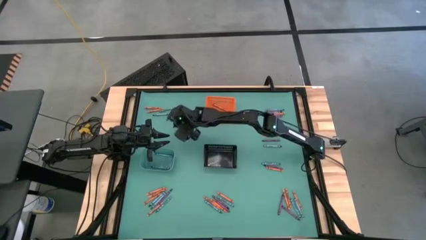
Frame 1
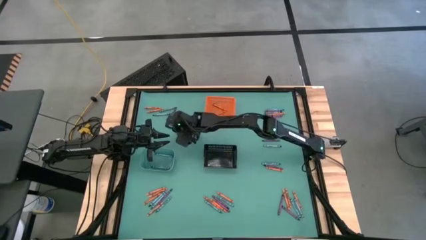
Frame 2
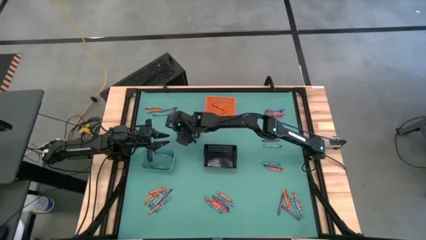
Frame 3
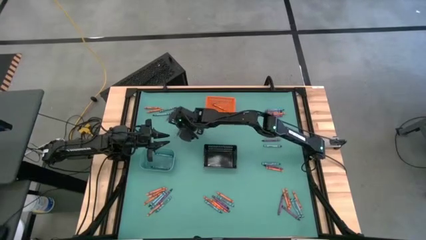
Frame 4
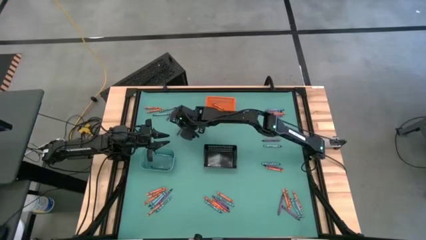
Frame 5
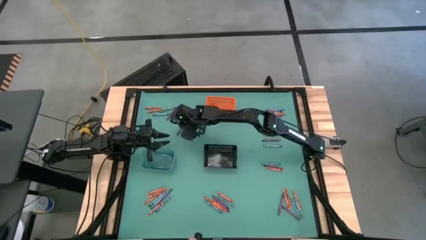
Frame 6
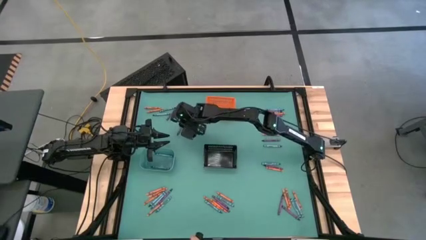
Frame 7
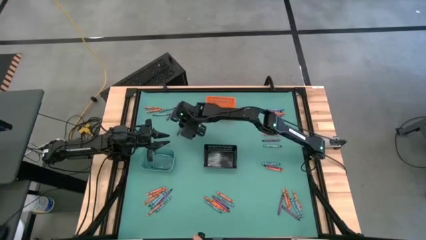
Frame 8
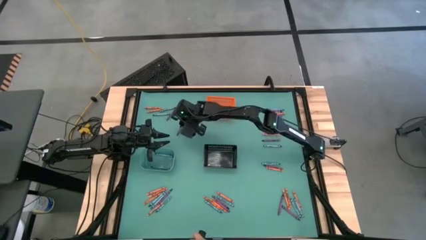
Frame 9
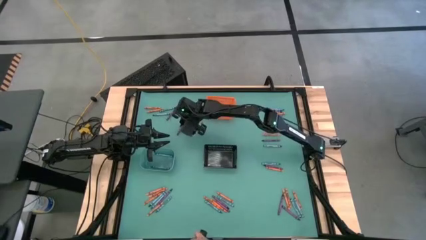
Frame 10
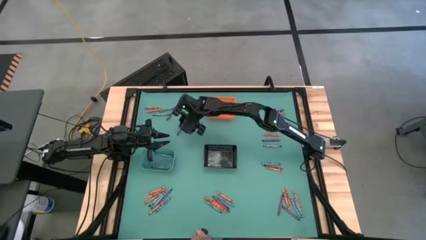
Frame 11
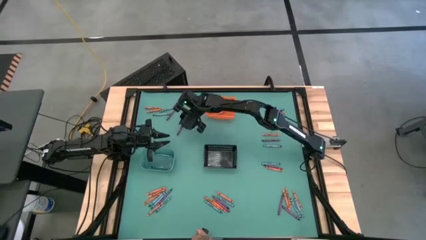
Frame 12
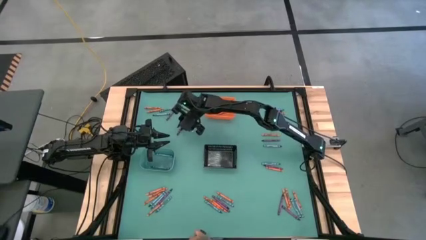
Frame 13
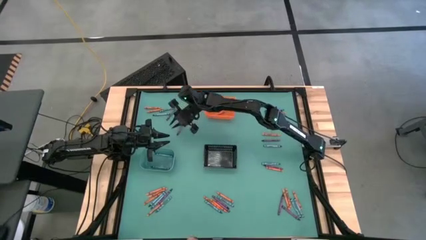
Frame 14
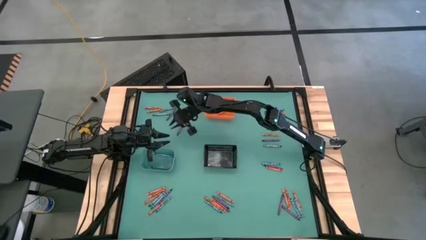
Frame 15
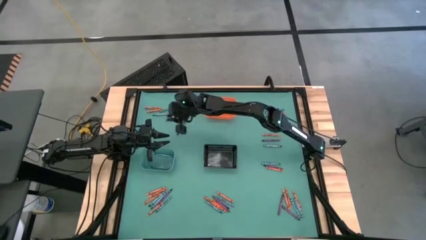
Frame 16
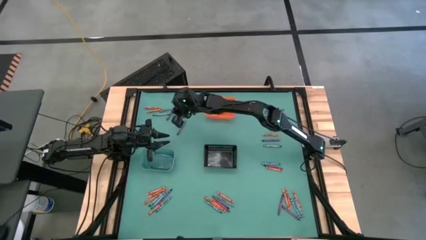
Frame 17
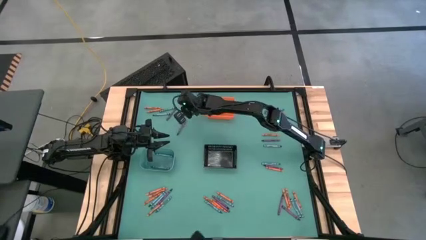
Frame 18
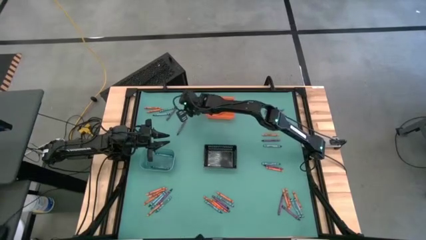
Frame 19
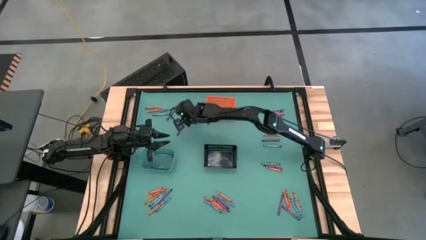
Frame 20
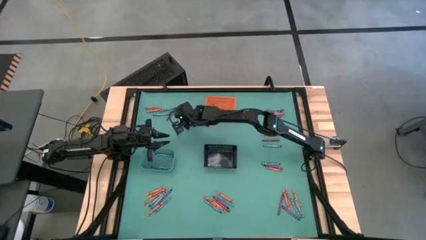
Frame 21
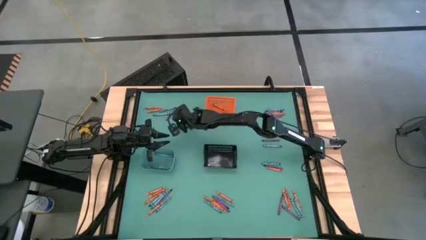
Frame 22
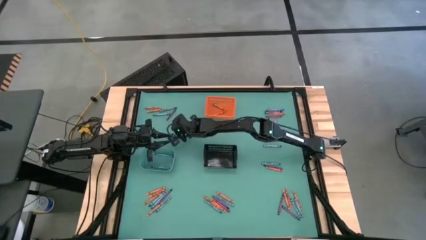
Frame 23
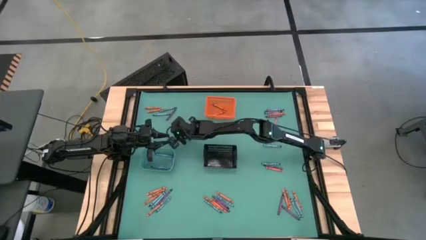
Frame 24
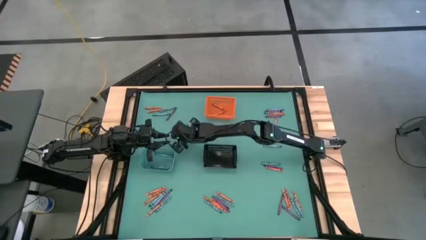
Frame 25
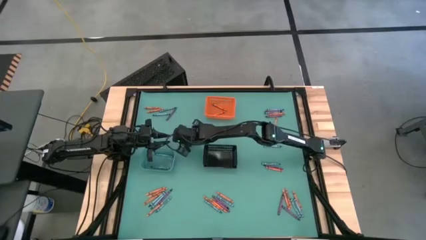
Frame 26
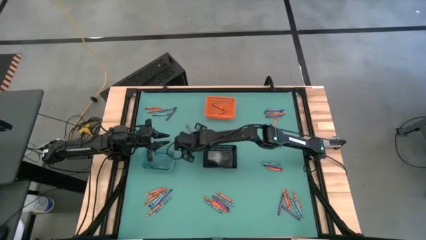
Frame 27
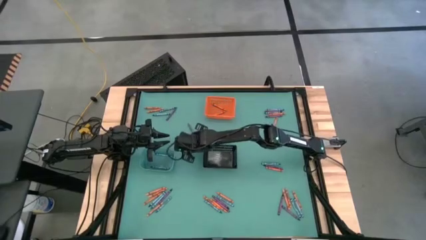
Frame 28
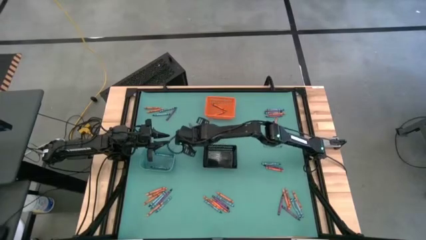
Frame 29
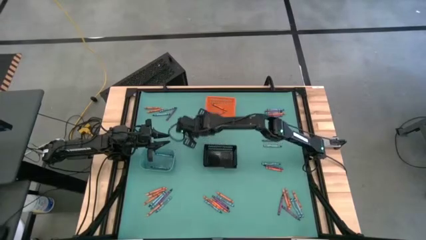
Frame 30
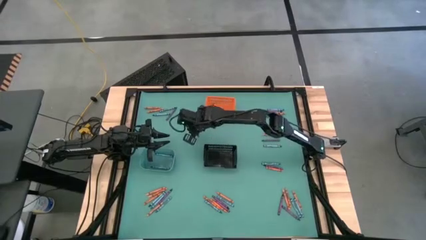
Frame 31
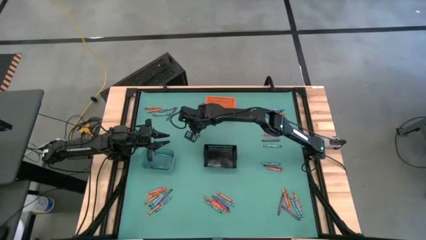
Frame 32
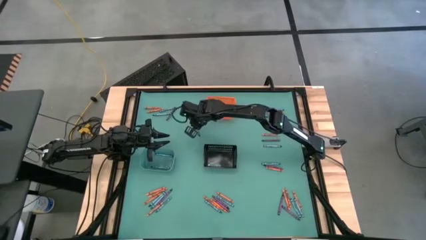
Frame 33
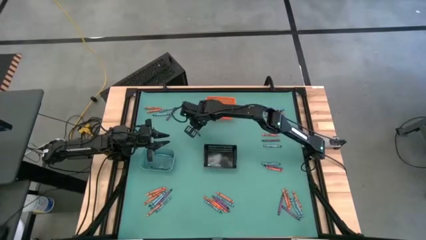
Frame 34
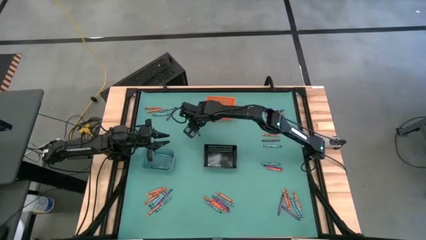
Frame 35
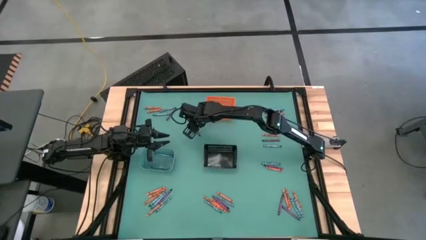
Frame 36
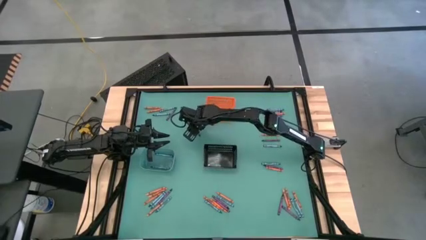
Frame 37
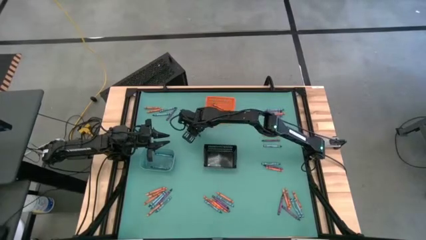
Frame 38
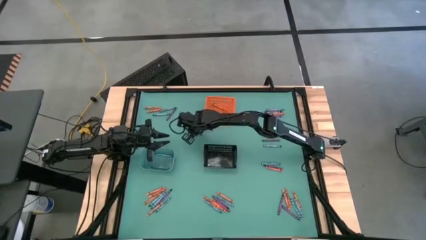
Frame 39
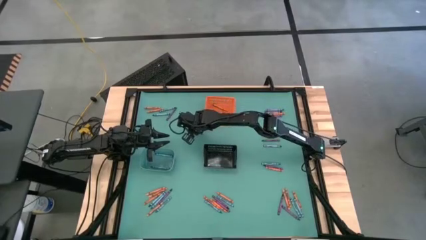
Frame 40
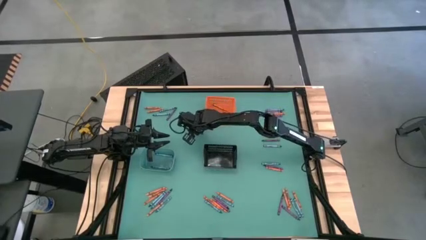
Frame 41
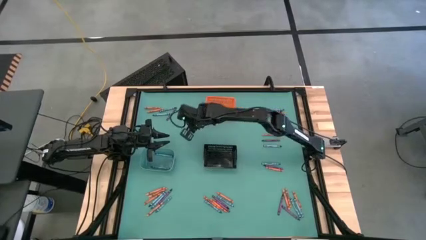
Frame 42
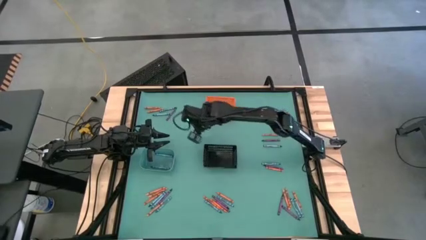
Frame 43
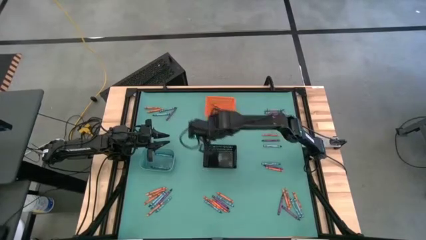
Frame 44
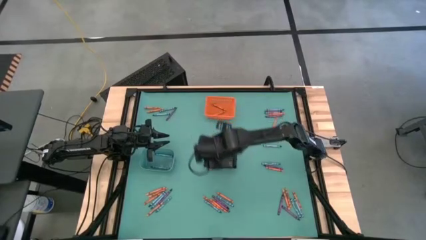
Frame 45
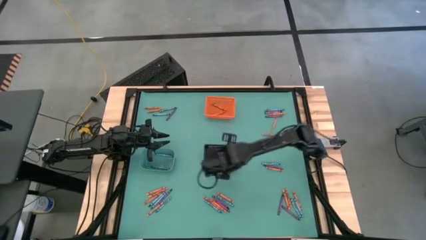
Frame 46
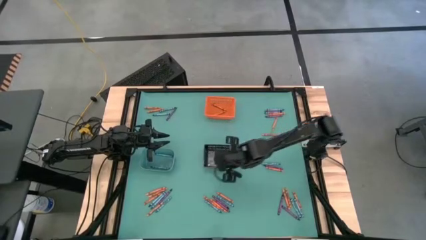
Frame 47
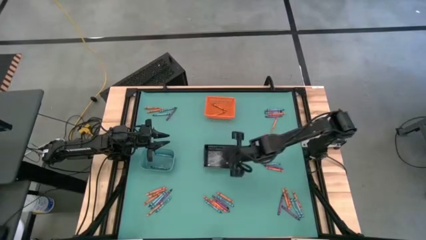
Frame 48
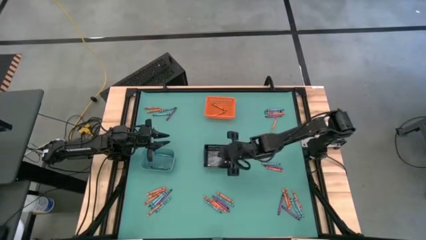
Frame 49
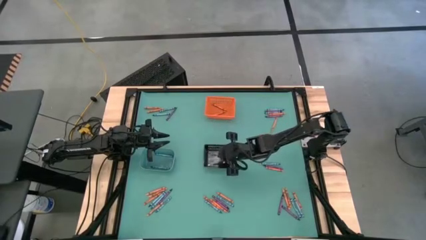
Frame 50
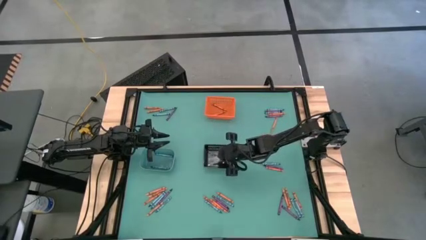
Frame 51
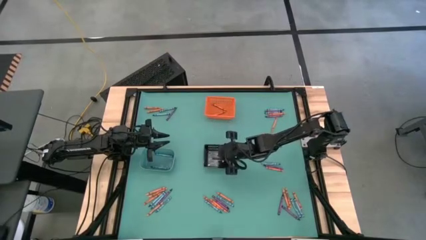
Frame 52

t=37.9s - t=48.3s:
Task: Sort crayons
Put the violet crayon into the black bin

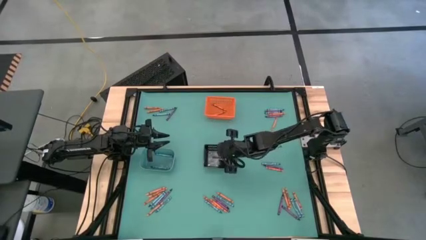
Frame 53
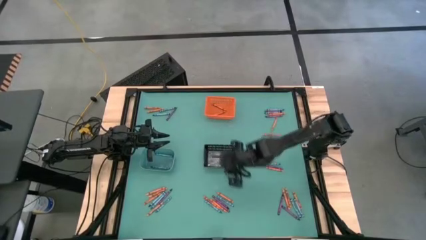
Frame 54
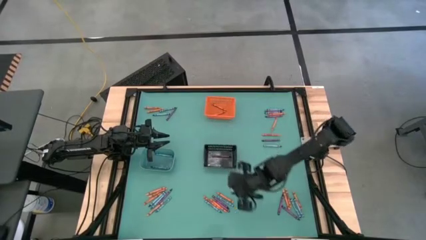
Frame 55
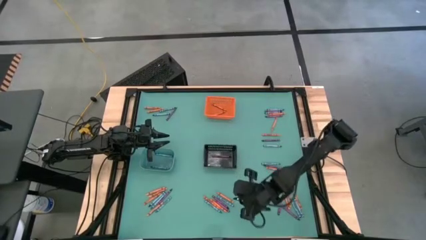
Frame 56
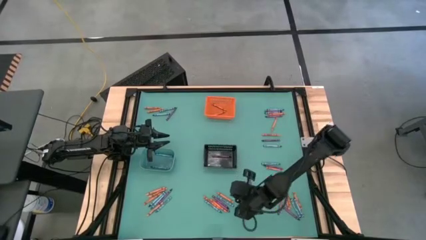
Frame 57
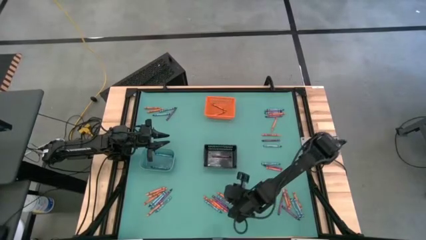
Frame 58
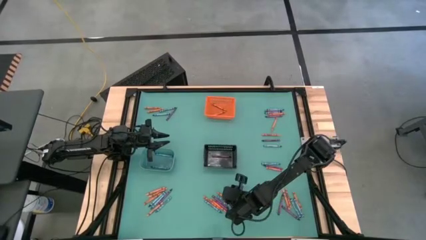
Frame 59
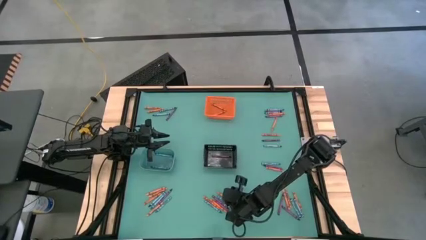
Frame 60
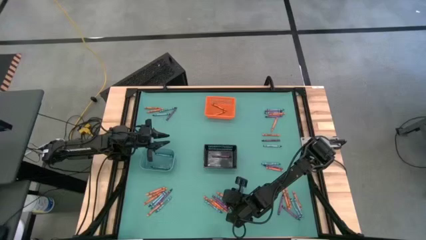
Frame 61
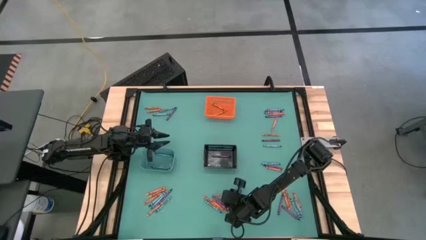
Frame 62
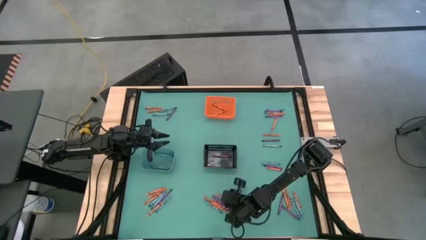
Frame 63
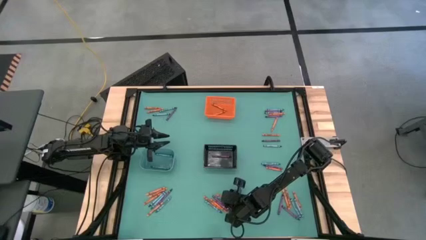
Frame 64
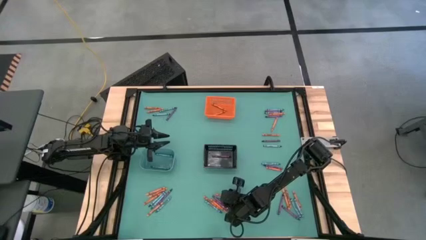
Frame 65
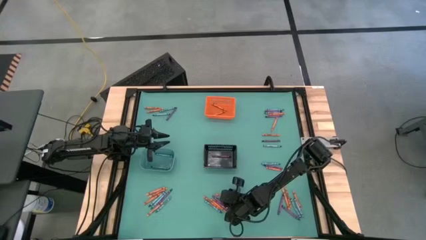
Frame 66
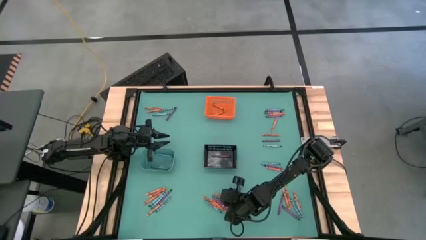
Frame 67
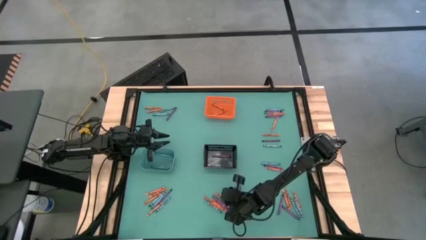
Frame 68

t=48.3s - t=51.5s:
Put the blue crayon into the light blue bin

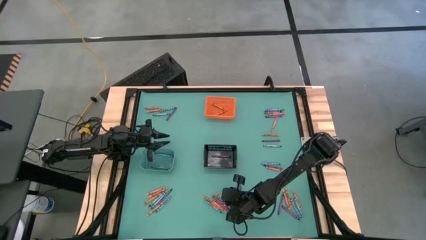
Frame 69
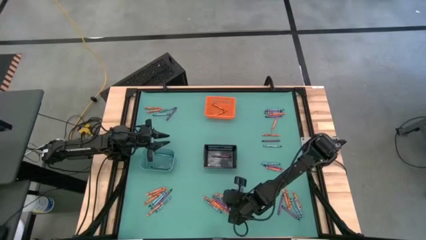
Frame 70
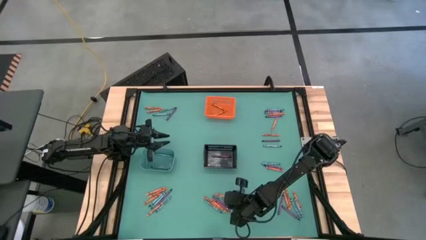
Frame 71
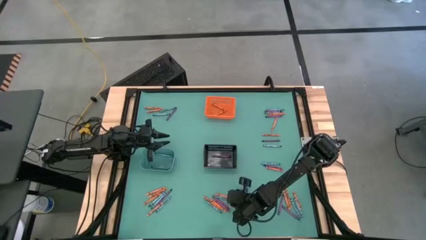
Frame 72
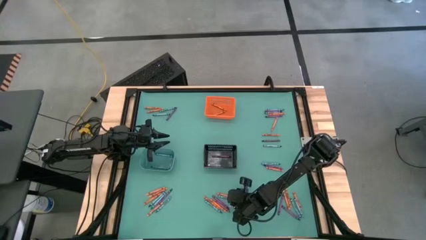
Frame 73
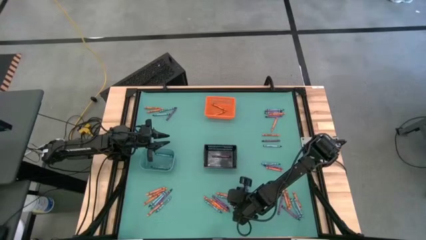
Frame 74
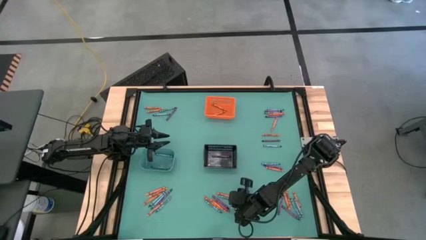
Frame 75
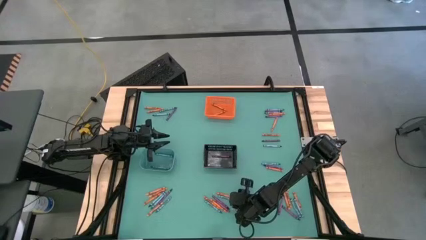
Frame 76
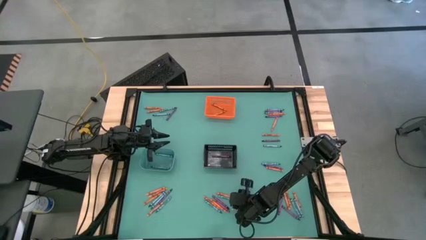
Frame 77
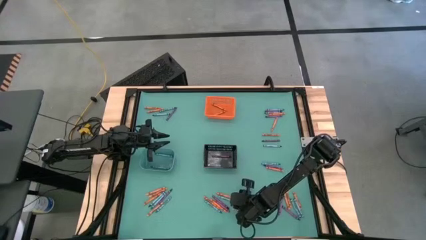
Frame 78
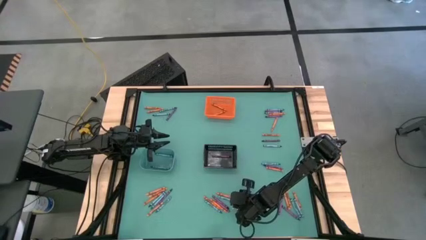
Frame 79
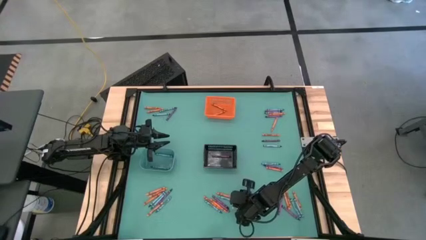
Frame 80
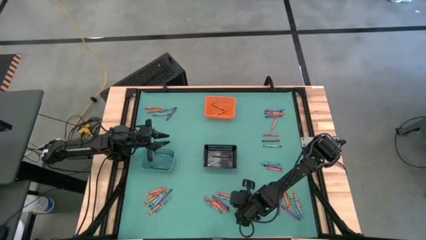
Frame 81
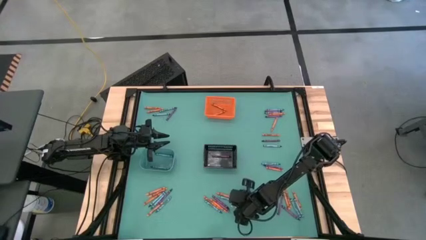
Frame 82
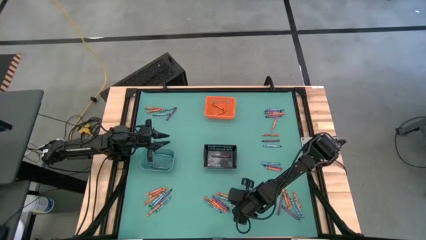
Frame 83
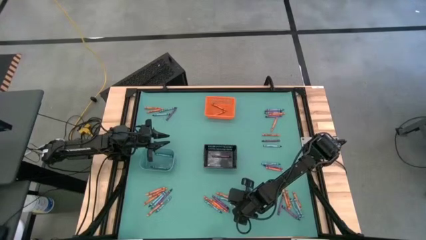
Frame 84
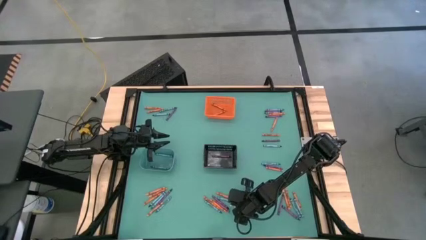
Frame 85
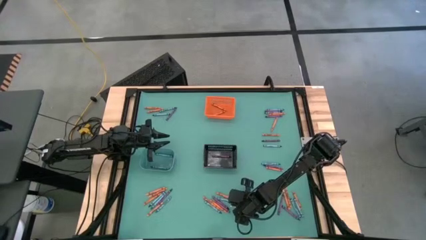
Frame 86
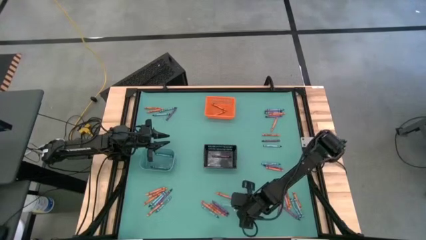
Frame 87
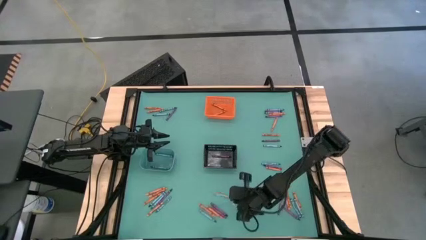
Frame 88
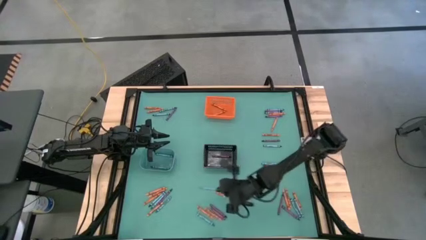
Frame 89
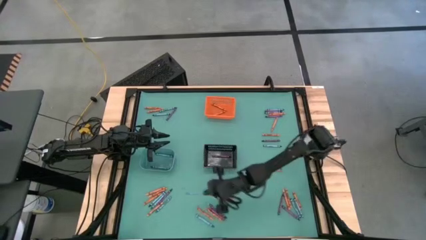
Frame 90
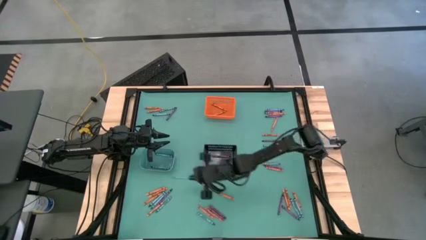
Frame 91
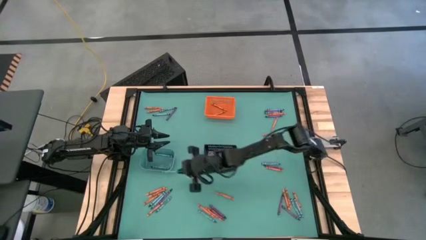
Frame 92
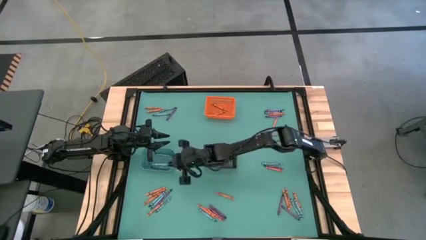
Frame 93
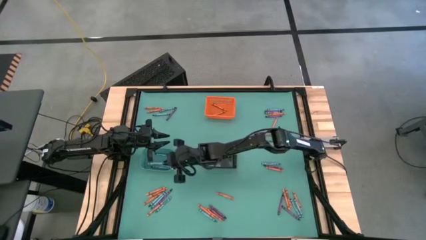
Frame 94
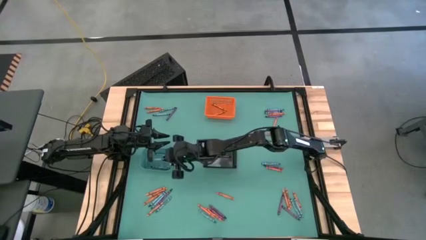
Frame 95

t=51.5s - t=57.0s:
Put the blue crayon into the light blue bin
